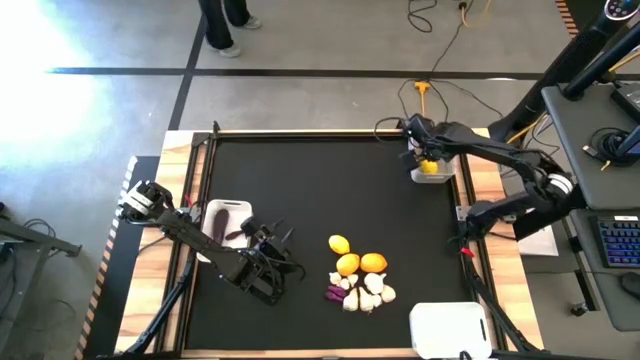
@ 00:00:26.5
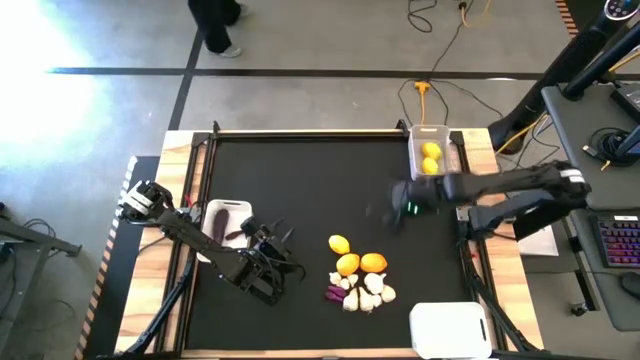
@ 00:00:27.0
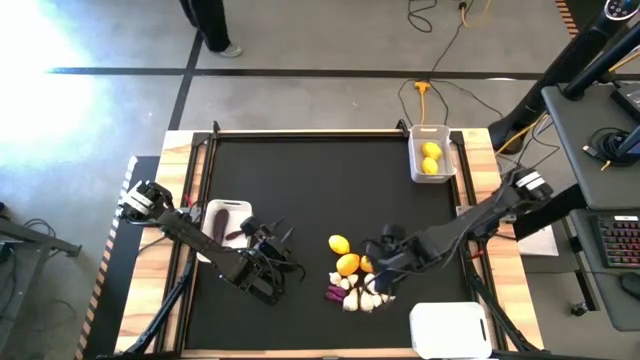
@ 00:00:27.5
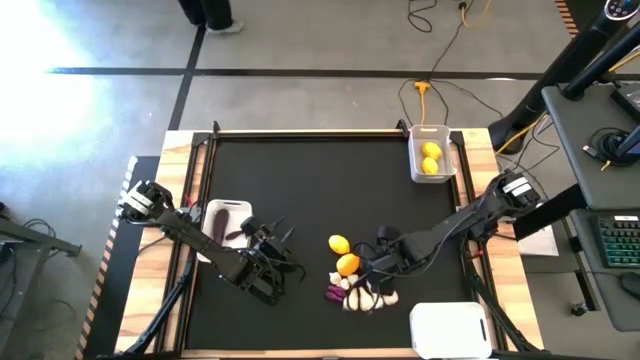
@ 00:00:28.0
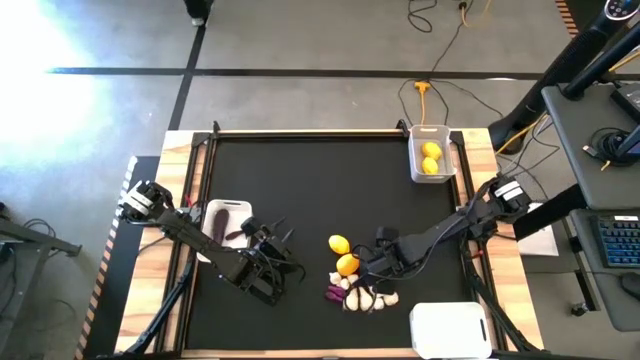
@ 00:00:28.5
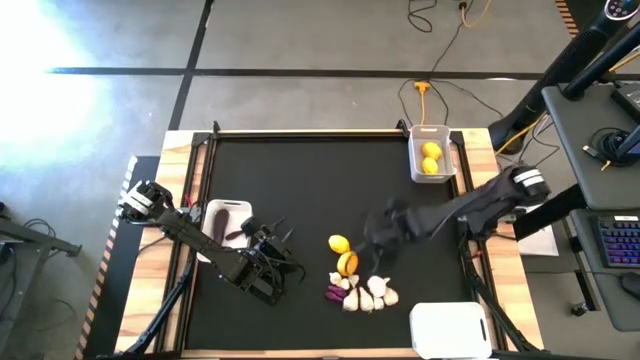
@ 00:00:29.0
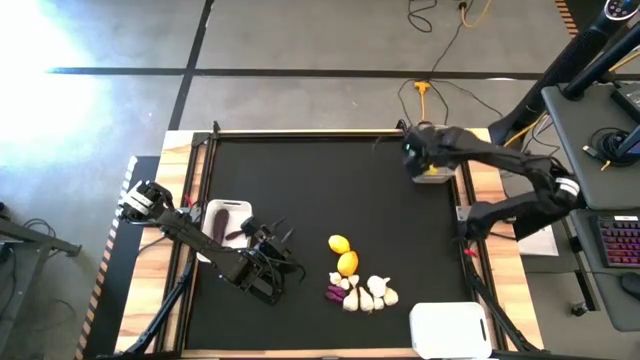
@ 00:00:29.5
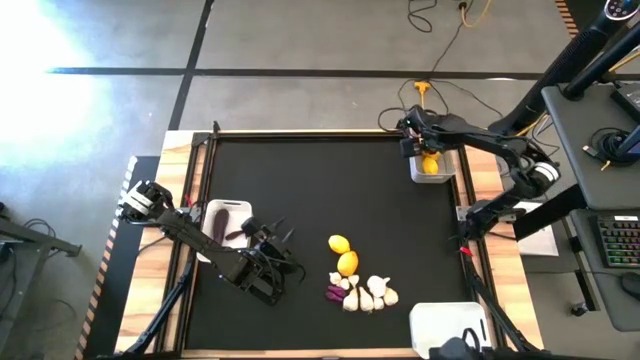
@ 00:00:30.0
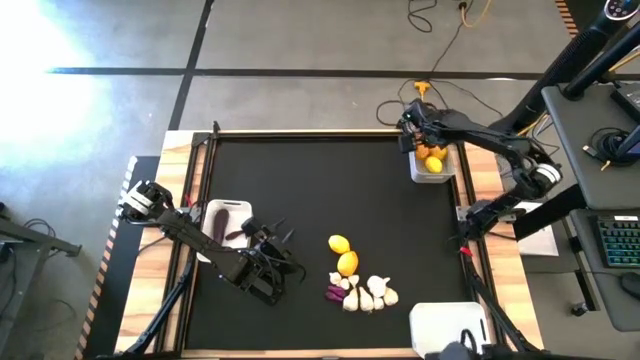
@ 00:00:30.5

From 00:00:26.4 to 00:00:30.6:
Task: Sort produce into baskets
Put the lemon into the gray bin

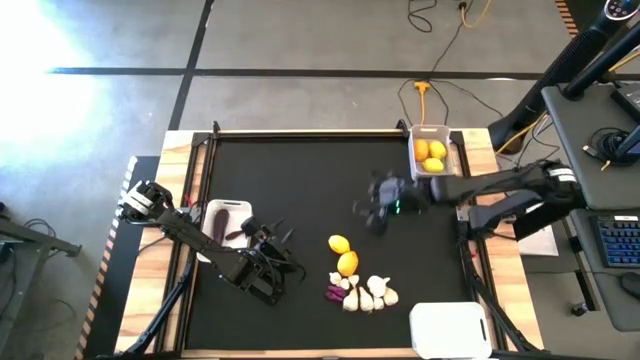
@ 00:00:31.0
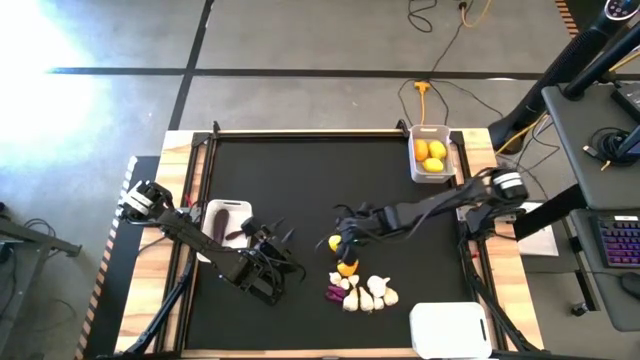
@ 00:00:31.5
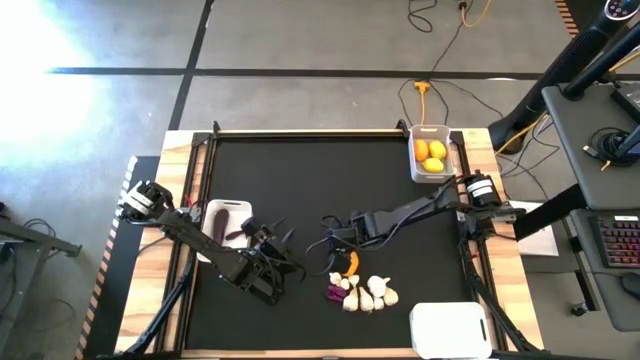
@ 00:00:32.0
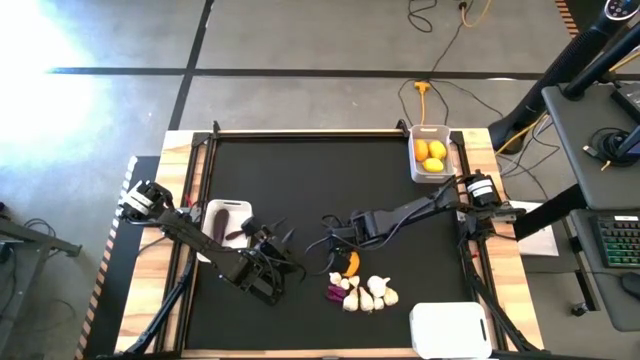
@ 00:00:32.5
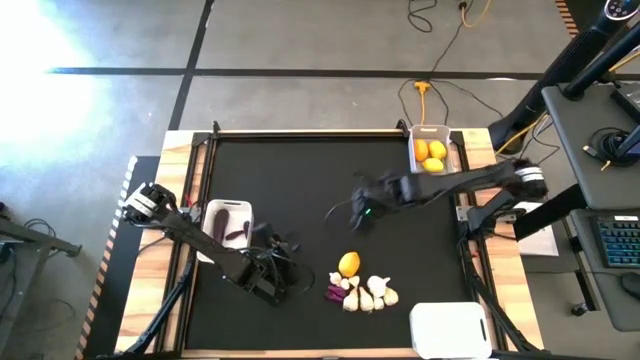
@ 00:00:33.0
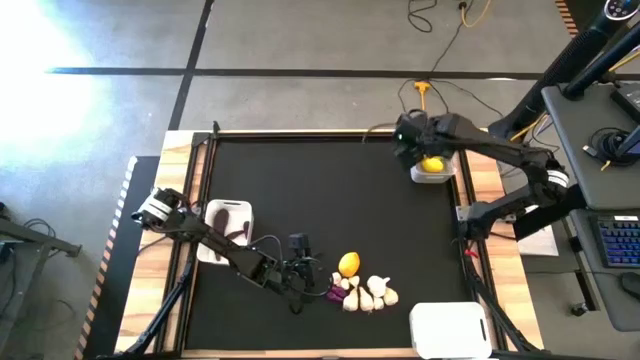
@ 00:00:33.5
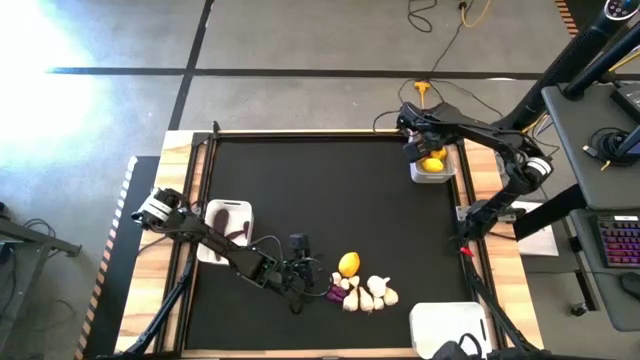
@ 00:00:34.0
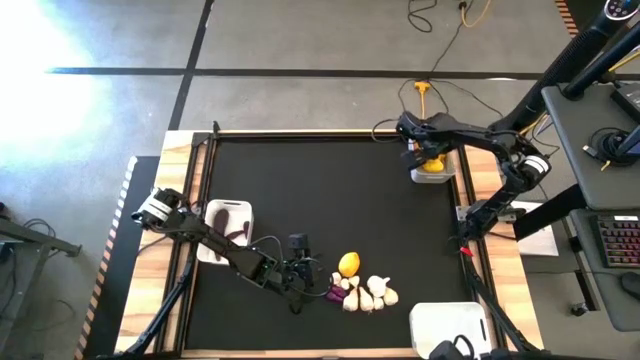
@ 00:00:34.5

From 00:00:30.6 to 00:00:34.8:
Put the lemon into the gray bin

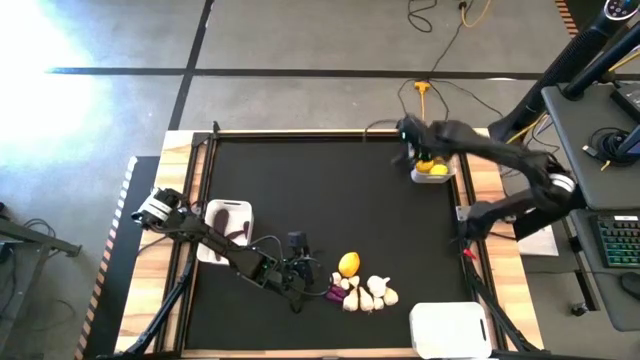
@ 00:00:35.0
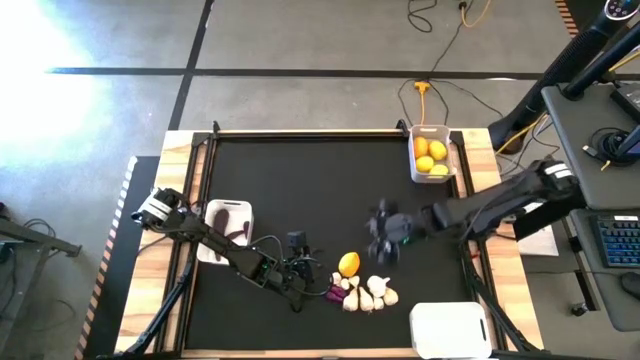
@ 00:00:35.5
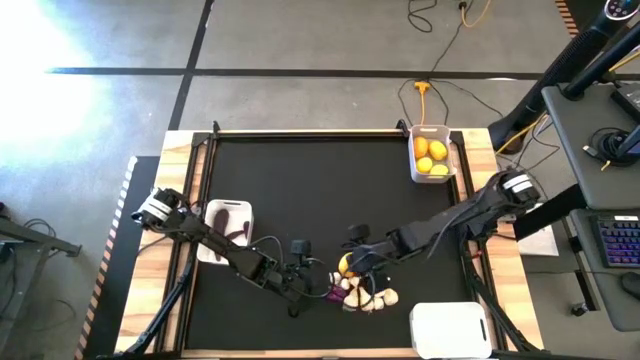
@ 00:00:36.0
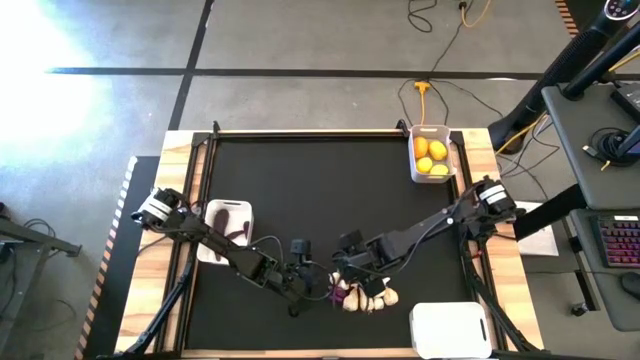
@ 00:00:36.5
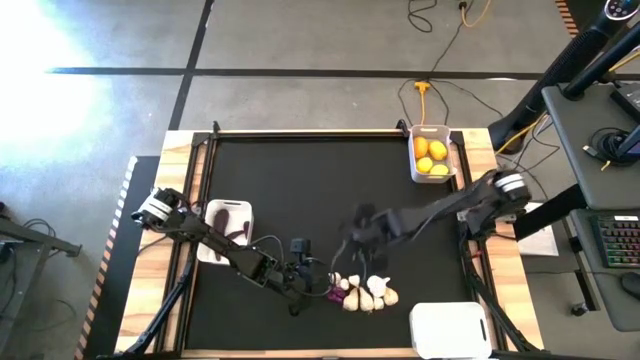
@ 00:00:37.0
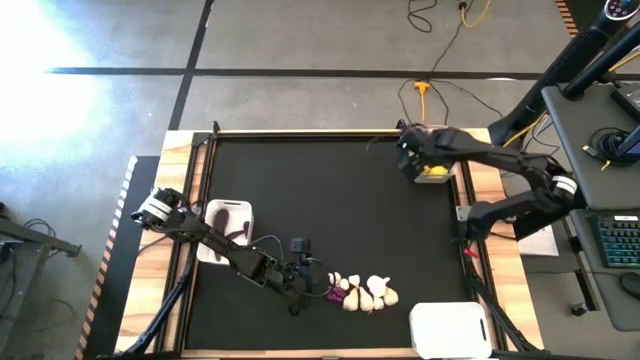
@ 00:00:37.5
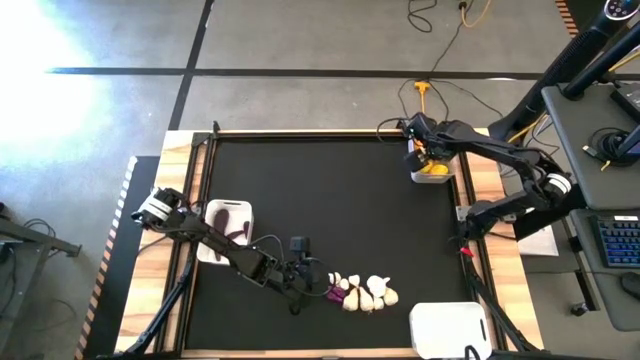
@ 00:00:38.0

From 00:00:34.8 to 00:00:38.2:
Put the lemon into the gray bin

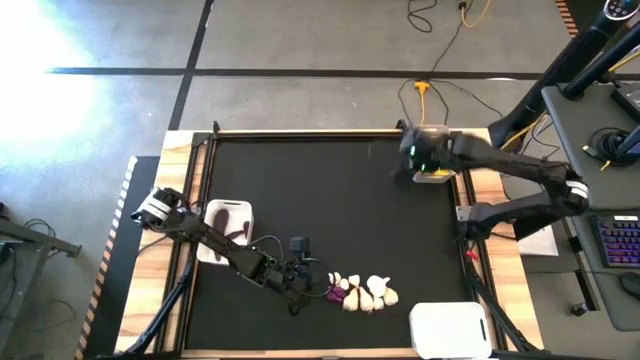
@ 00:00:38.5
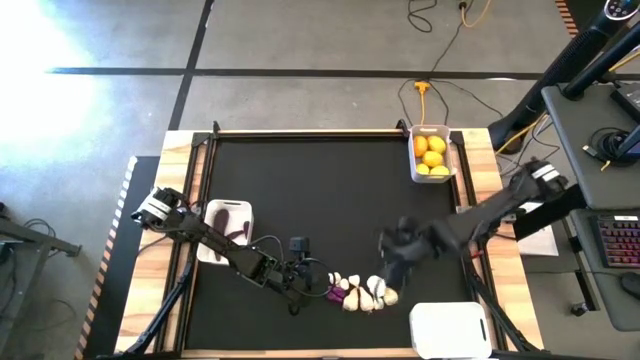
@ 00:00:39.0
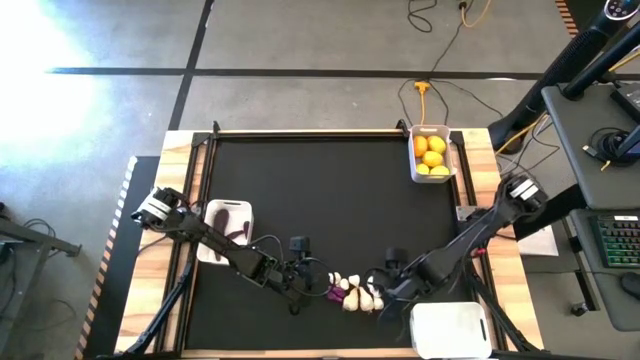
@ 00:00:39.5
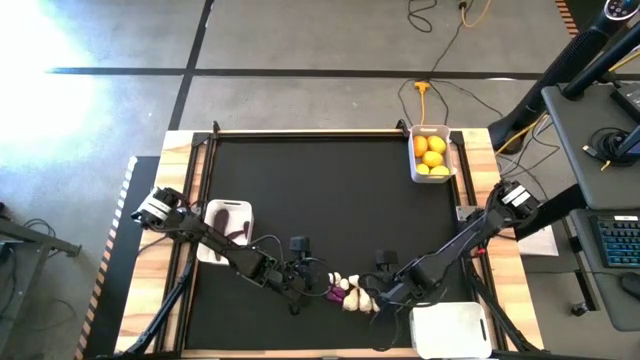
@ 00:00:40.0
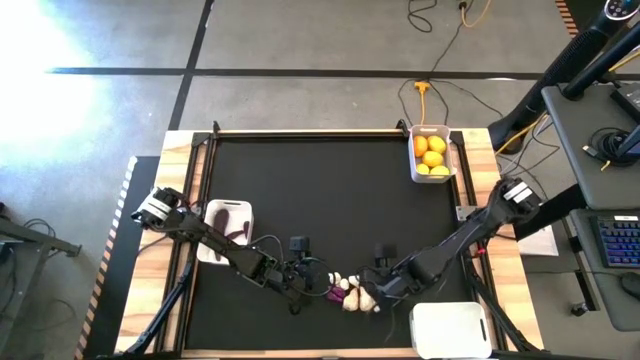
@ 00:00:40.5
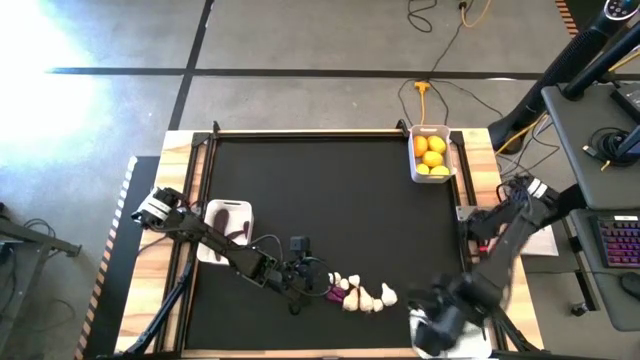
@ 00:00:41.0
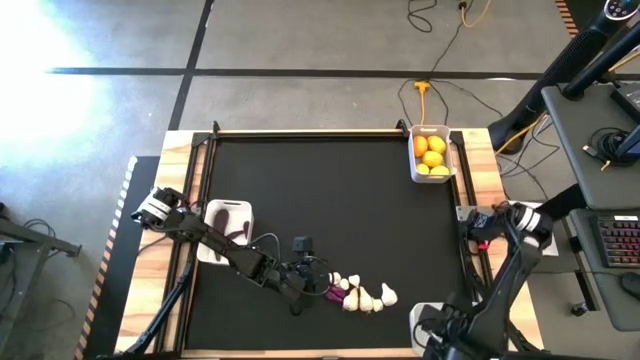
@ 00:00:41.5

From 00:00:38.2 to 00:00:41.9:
Put the garlic into the bottom white bin

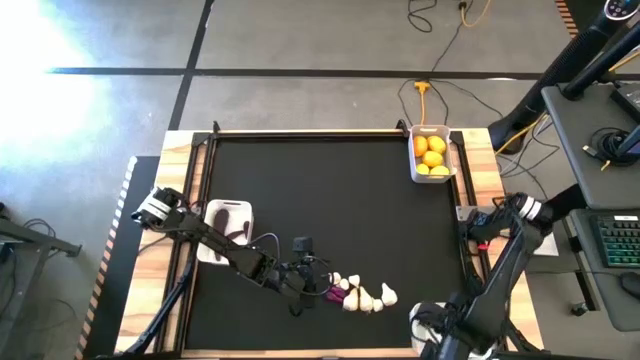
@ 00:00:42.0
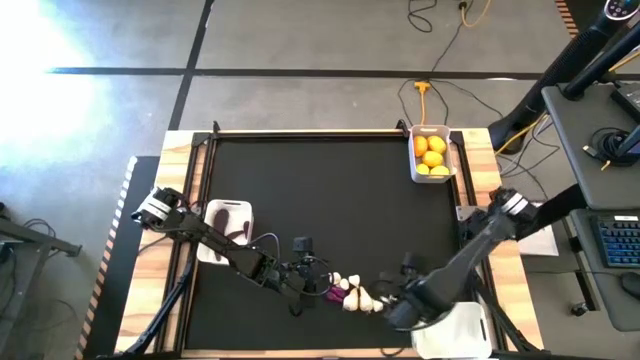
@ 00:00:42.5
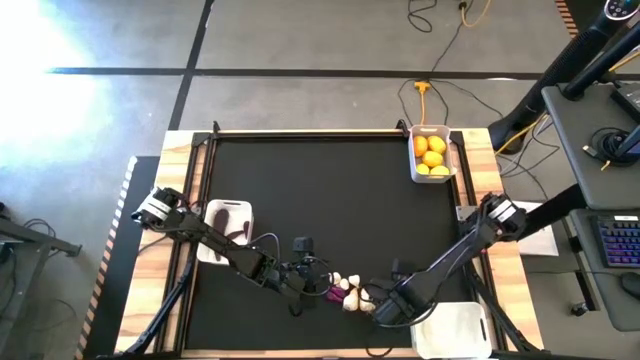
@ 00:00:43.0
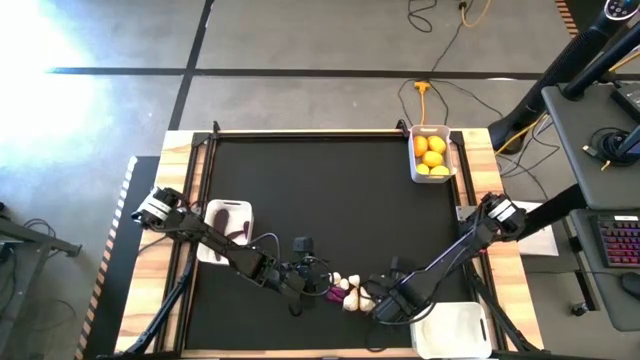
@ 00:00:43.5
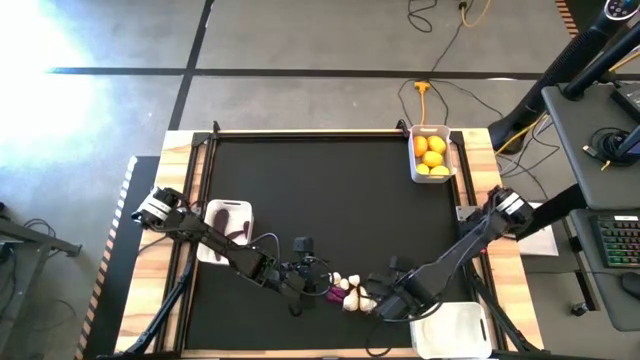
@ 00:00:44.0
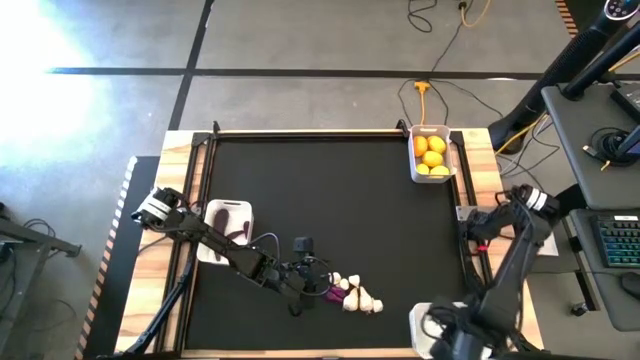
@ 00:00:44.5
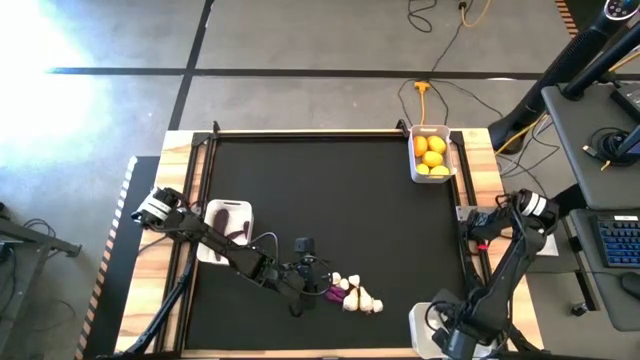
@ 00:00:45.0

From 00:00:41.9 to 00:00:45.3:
Put the white garlic into the right white bin

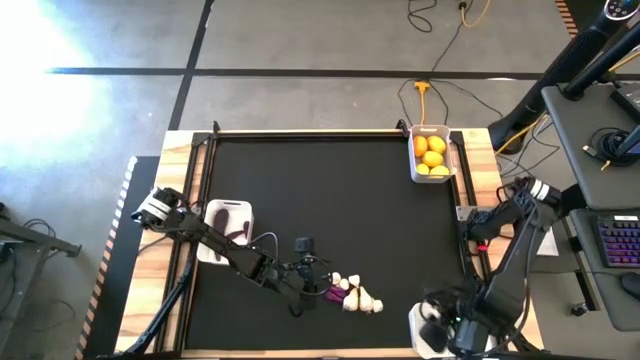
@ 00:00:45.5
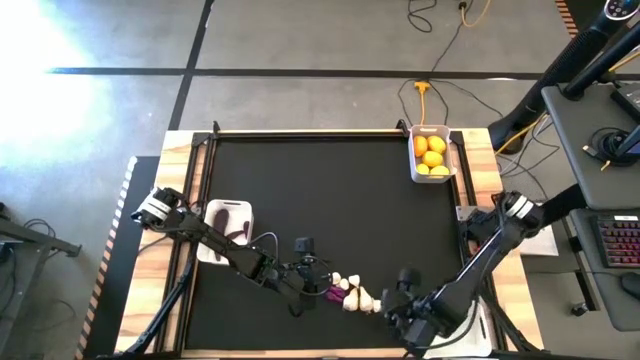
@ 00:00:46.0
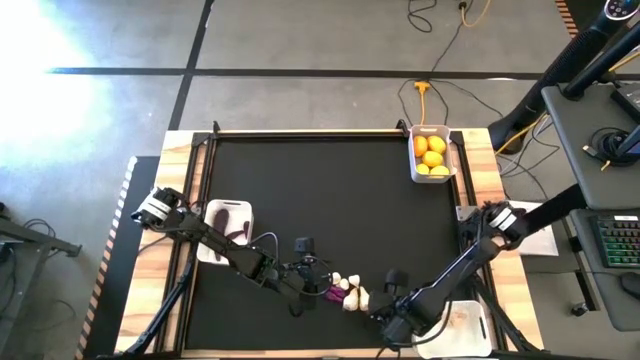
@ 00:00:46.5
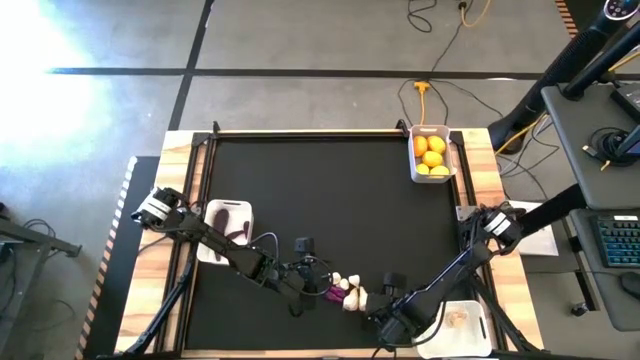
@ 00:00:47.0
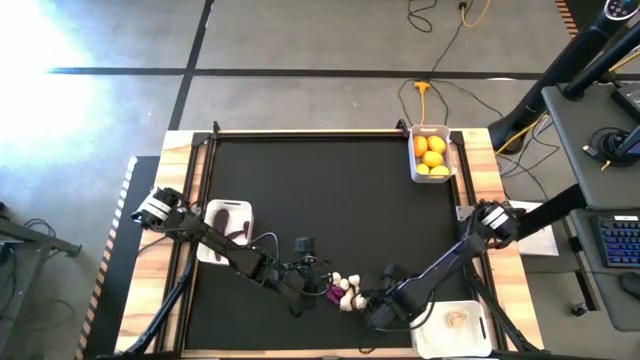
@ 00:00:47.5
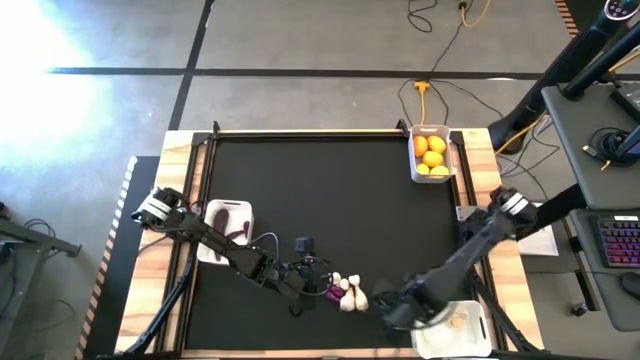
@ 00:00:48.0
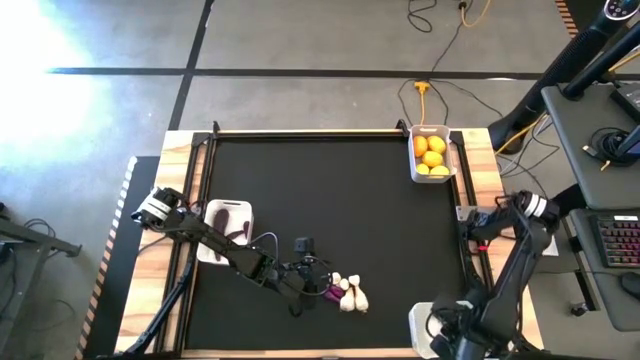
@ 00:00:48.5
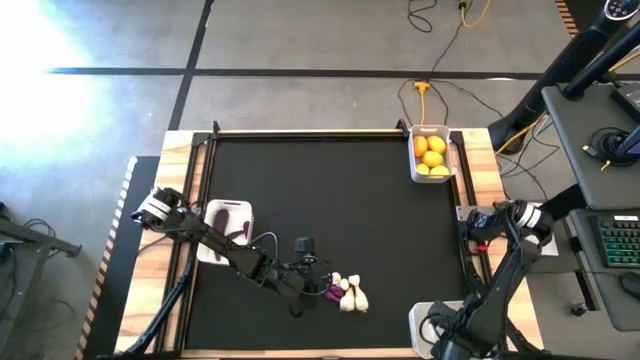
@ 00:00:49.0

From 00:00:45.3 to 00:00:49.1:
Put the garlic into the bottom white bin
